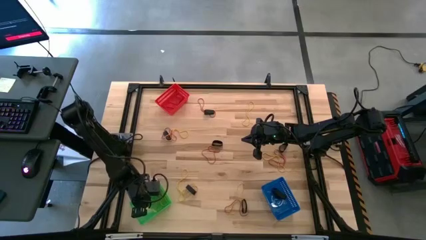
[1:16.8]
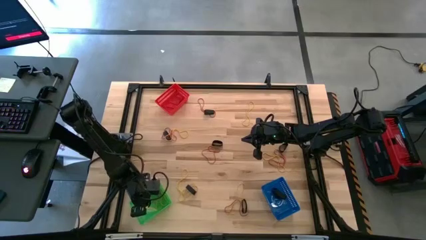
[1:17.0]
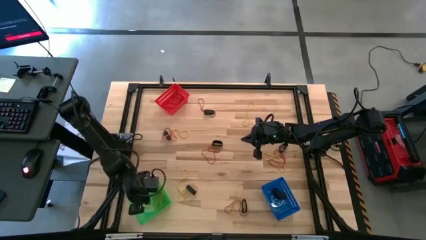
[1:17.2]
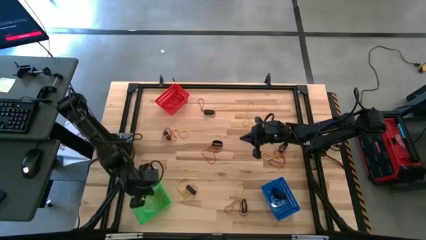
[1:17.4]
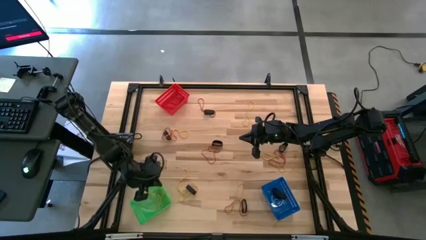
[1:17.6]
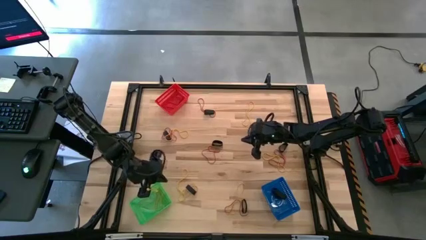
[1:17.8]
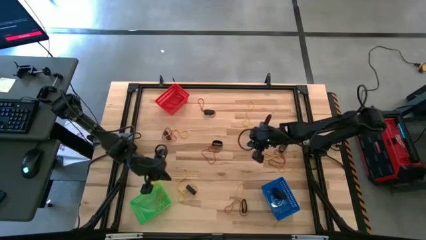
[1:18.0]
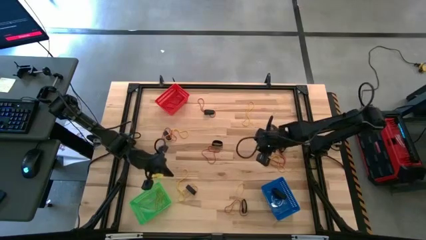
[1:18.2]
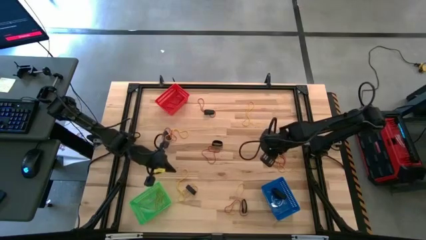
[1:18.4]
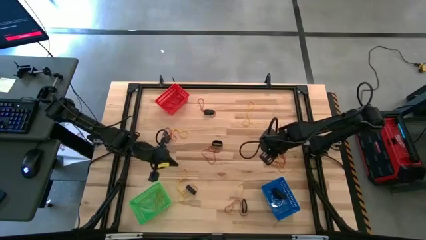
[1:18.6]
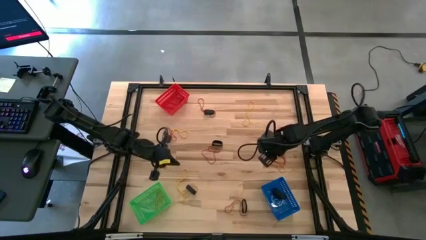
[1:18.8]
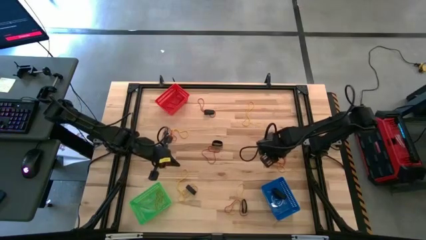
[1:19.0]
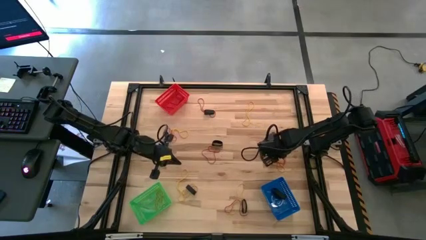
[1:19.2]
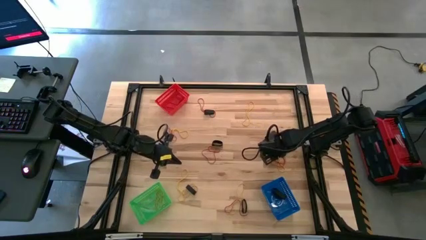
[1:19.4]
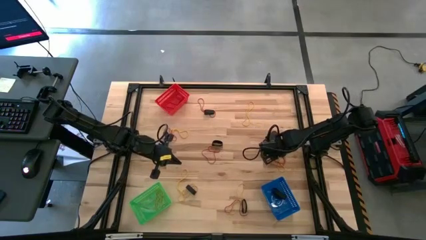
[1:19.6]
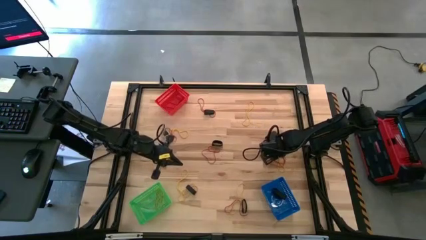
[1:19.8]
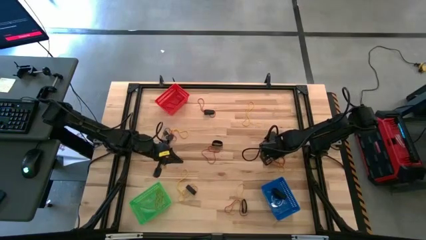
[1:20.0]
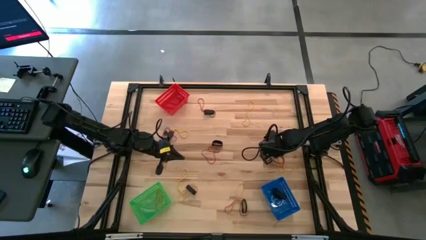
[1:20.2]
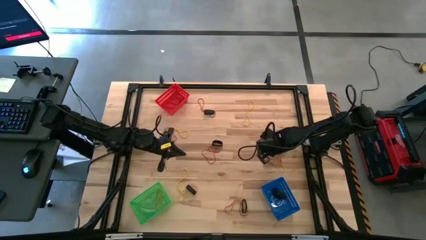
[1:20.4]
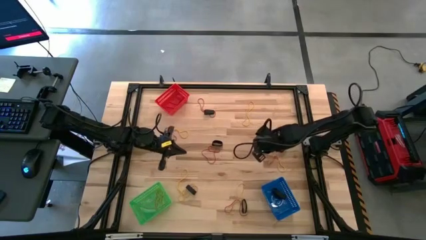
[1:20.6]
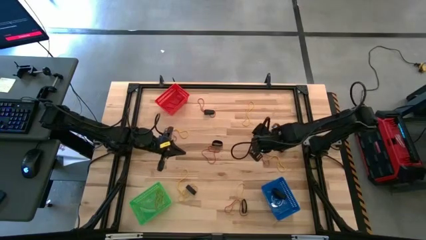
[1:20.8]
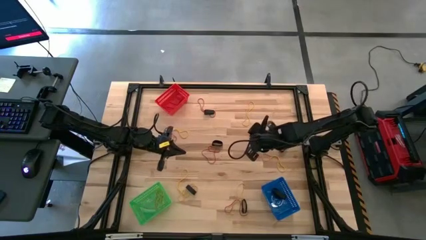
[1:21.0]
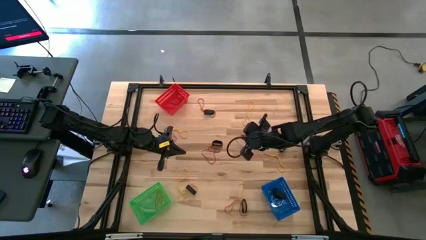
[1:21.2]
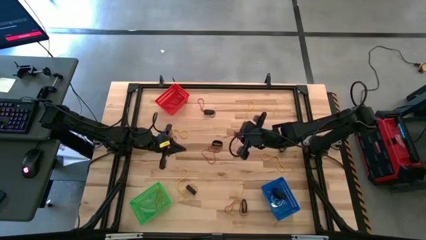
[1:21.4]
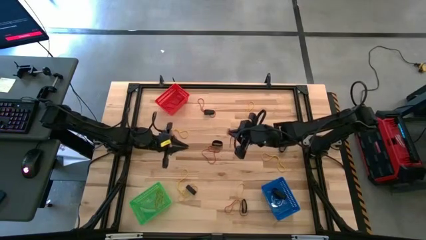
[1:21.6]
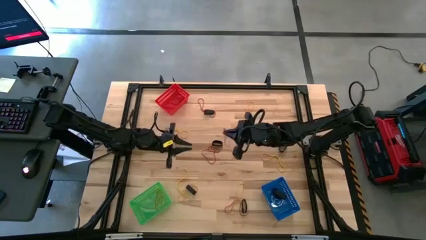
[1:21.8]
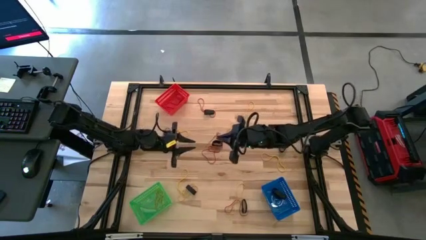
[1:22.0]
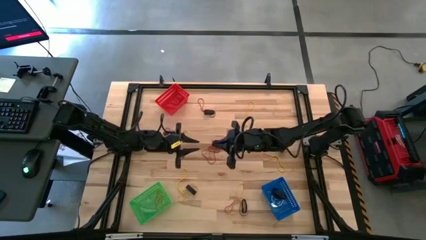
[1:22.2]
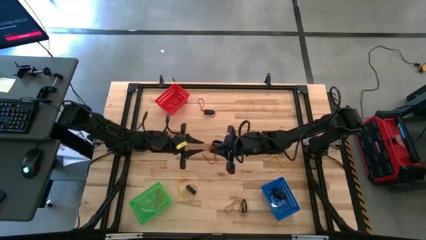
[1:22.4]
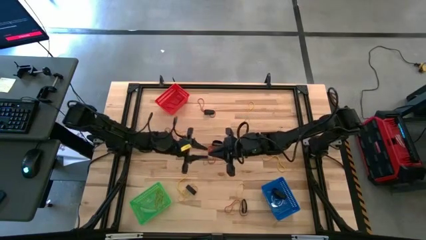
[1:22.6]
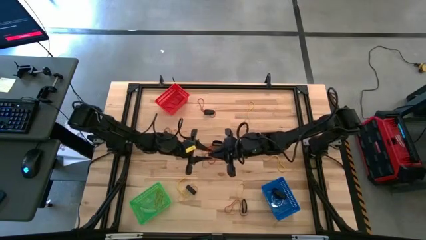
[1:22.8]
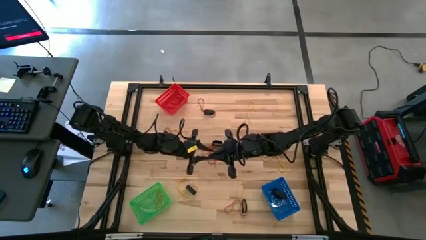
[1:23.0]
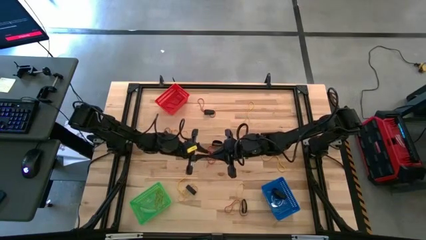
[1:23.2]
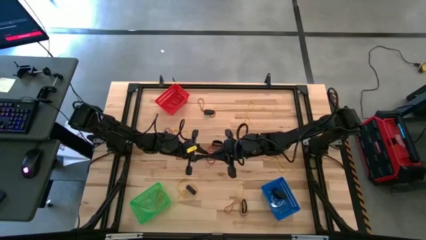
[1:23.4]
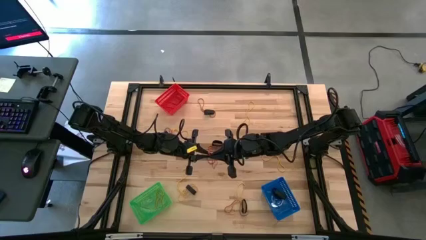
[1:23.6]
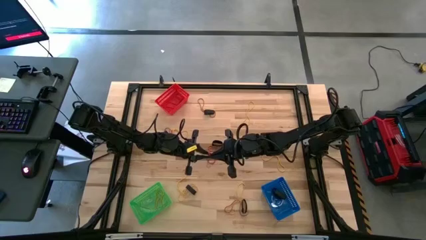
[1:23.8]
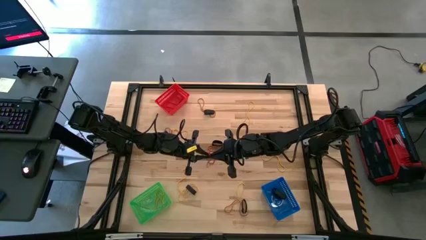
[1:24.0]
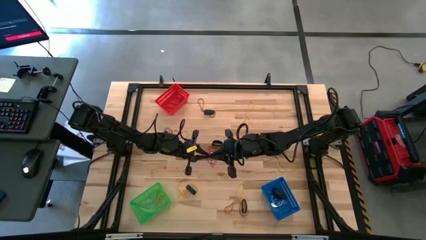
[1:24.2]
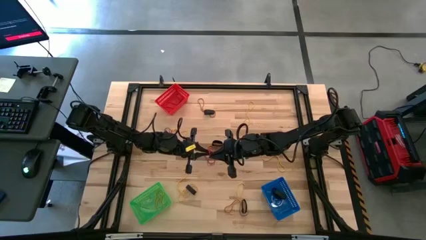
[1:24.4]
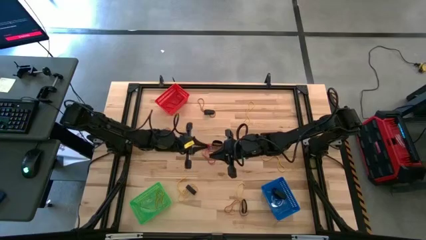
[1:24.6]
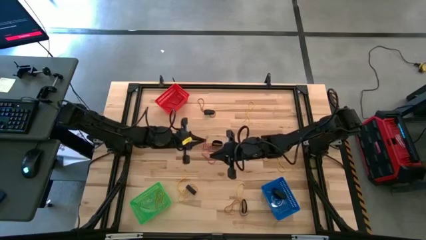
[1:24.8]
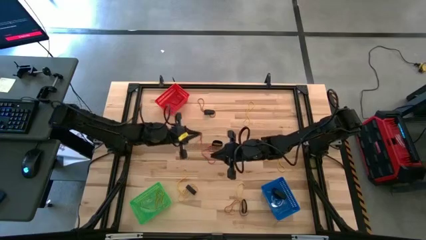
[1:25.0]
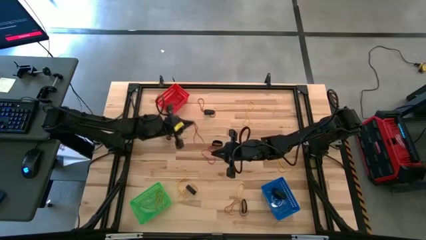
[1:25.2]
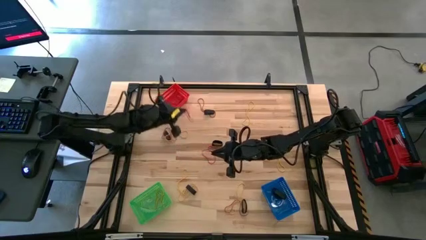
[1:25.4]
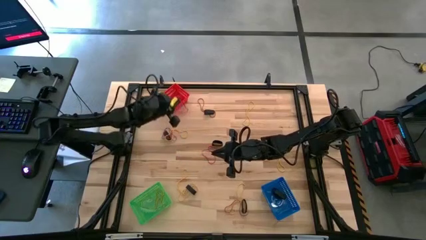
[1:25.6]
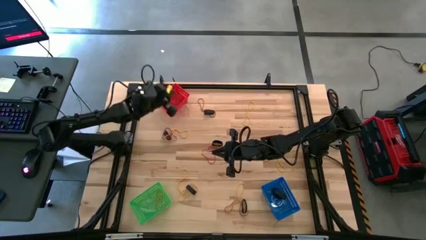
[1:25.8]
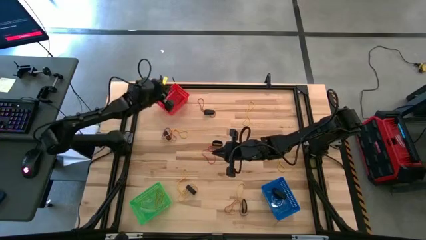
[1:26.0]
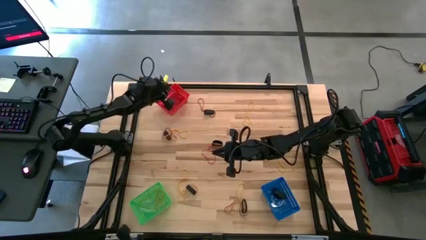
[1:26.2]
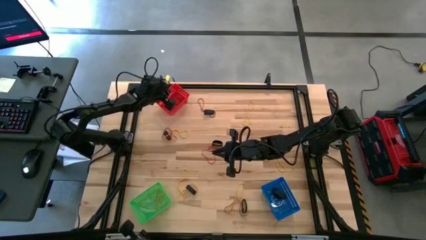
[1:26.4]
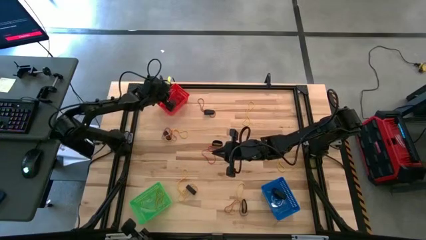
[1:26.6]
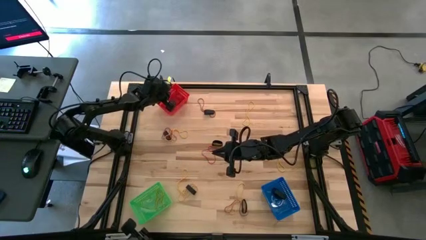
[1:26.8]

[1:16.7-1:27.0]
Task: Sort rubber bands into baskets
Put the red rubber band into the red basket

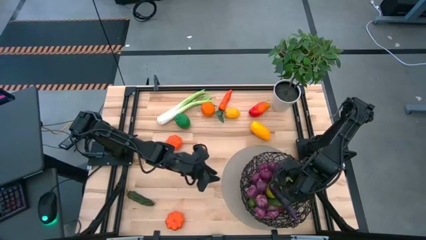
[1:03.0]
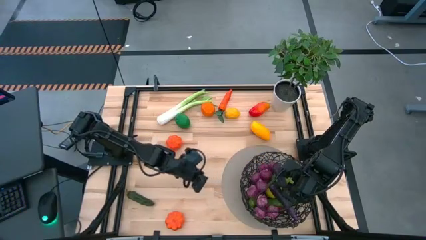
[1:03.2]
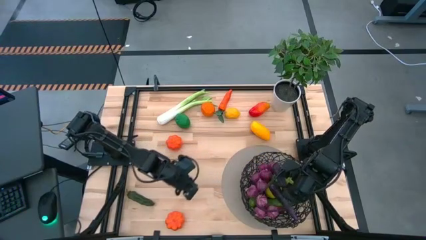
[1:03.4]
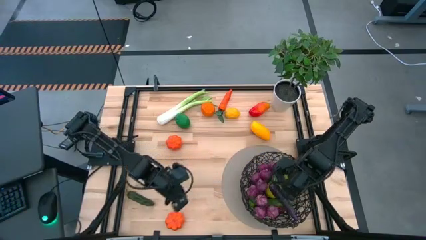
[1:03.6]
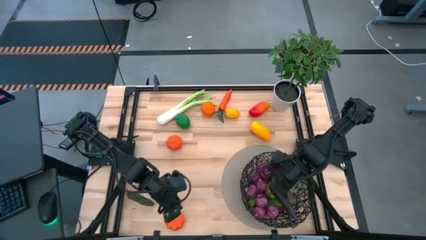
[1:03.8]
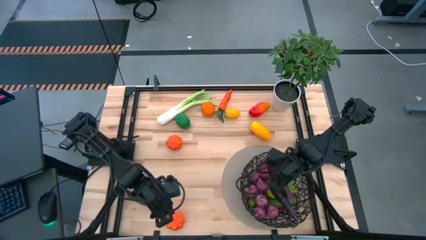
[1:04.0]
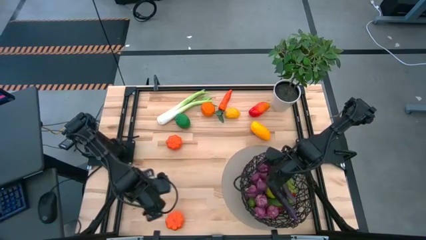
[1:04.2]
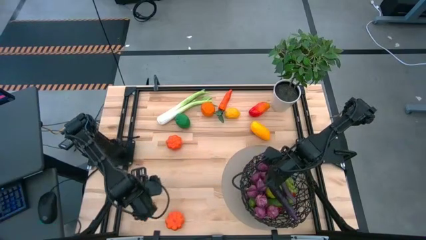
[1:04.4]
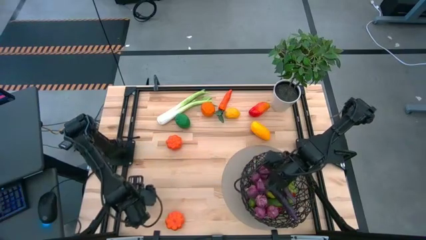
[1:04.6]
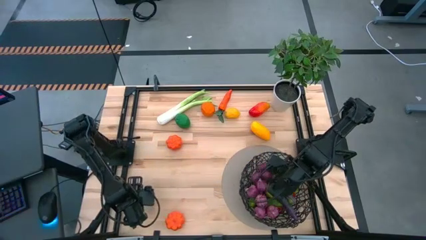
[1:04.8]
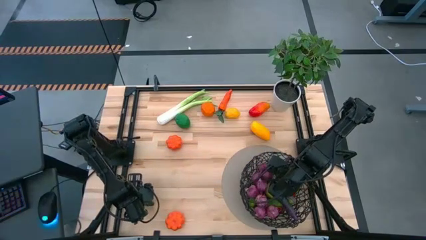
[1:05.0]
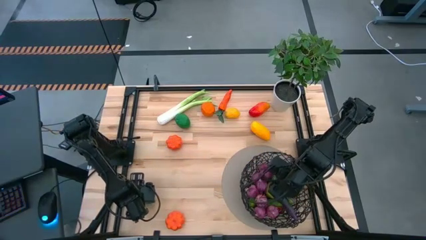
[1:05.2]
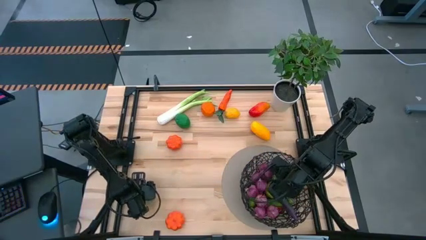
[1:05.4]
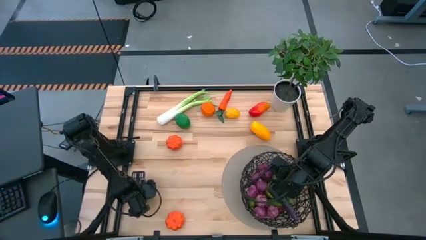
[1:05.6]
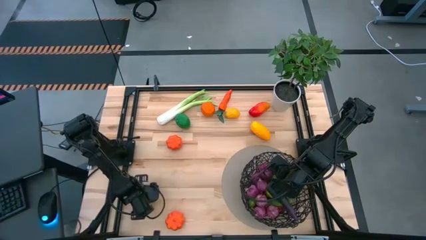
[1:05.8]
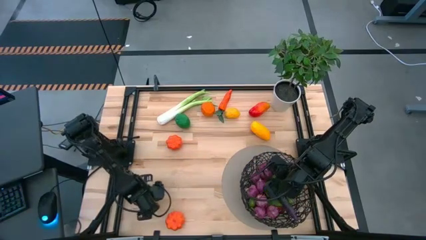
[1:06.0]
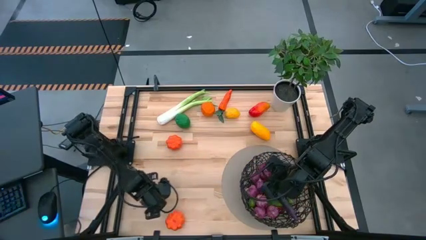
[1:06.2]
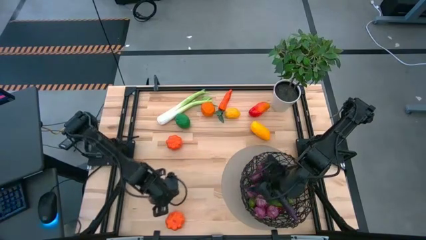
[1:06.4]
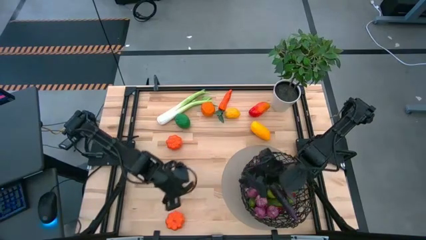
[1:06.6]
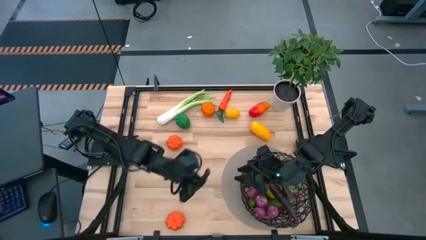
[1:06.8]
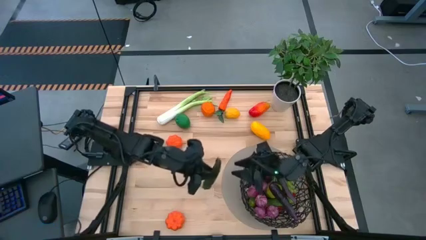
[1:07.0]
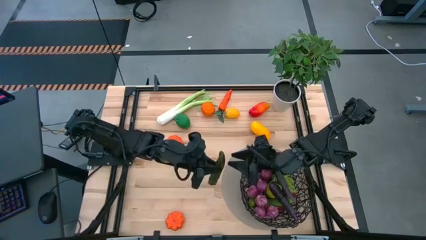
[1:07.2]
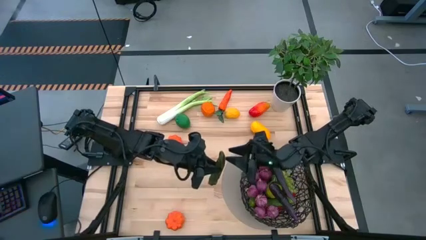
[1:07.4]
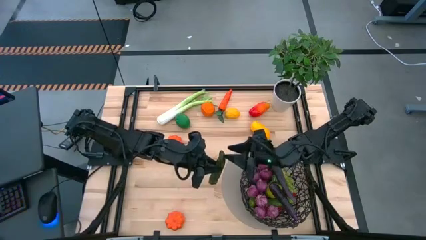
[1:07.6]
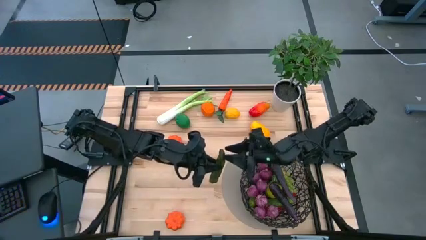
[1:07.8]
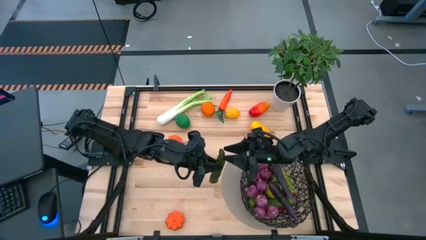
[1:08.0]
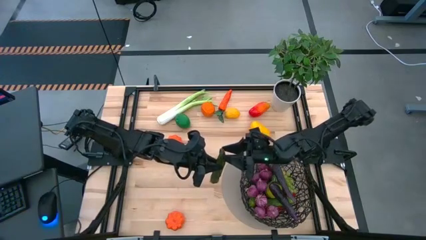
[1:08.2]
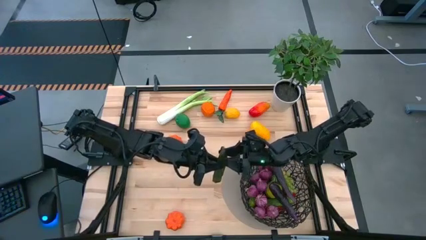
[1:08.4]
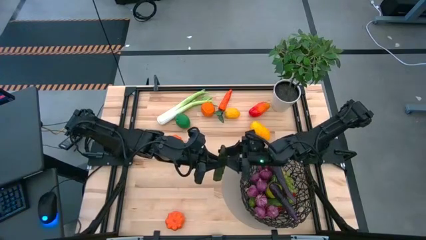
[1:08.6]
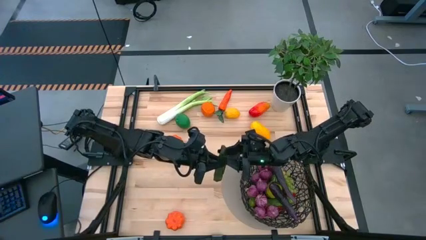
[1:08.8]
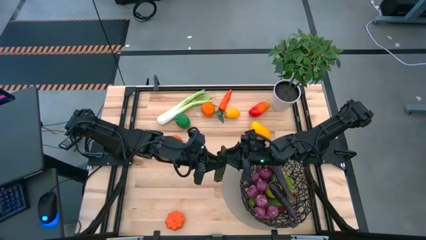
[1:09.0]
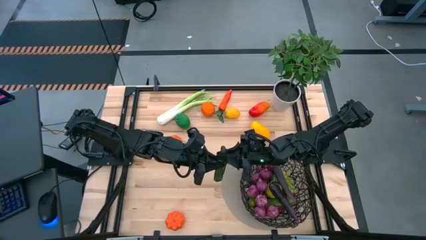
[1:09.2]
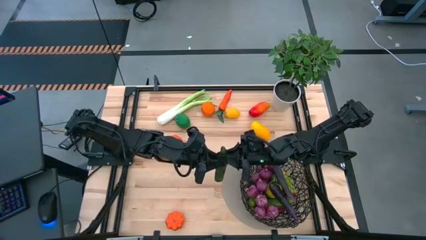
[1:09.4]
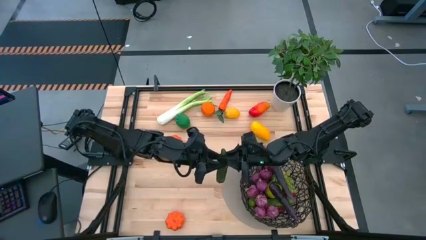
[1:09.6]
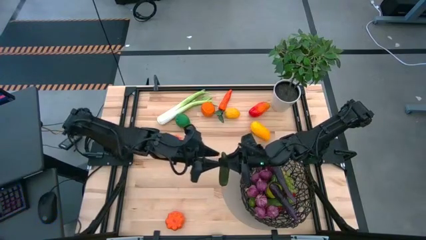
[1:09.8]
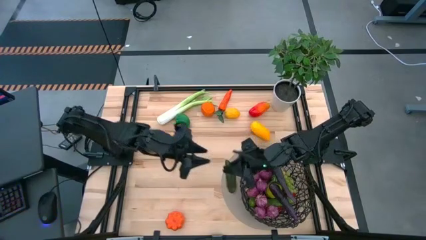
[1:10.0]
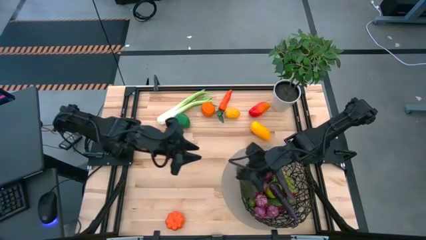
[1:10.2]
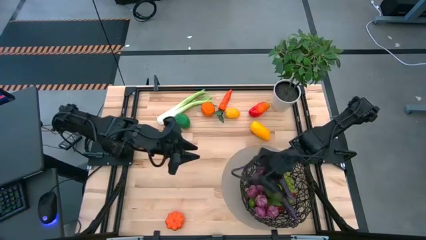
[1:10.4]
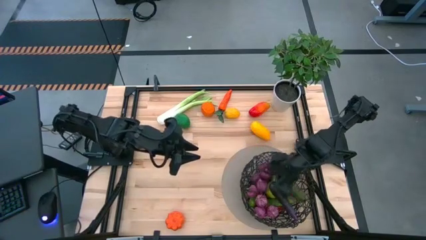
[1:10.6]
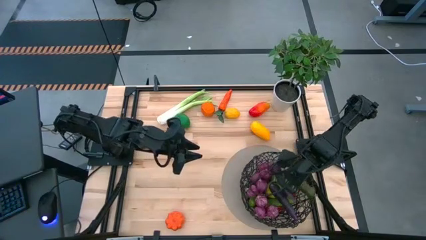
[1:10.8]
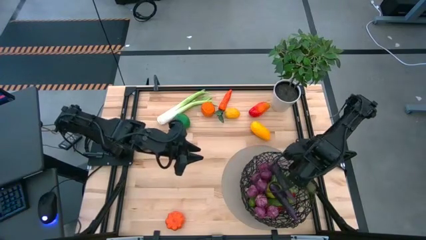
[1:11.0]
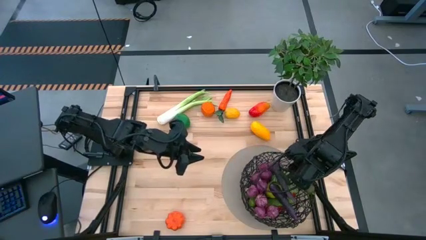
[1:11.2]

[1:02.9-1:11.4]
Task: Build produce basket
Put the green chili pepper into the black basket
